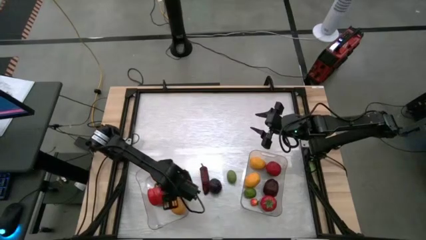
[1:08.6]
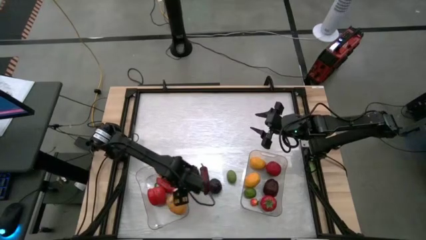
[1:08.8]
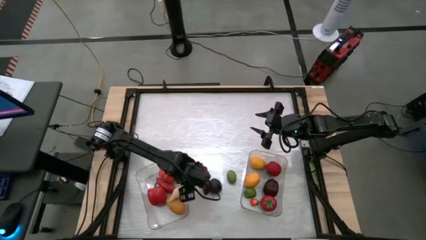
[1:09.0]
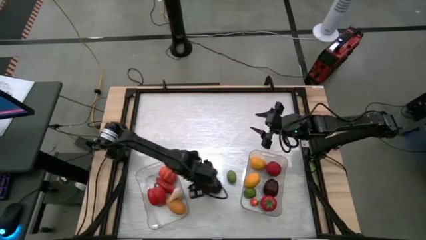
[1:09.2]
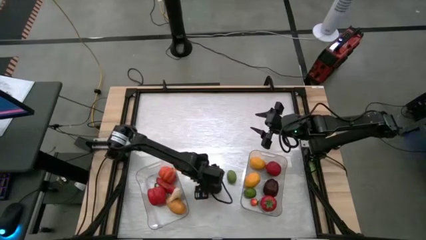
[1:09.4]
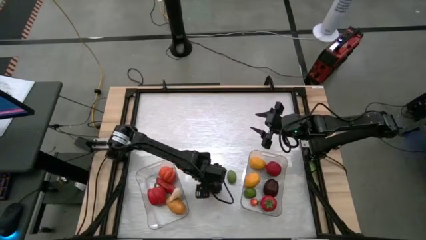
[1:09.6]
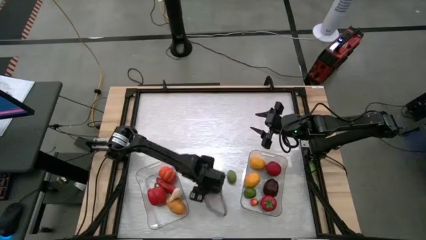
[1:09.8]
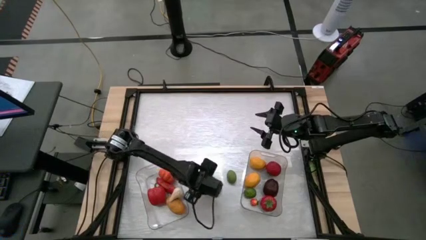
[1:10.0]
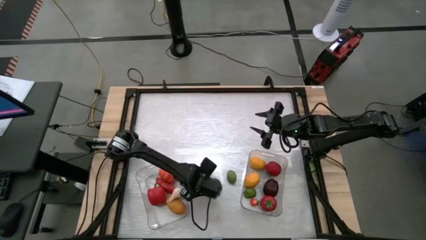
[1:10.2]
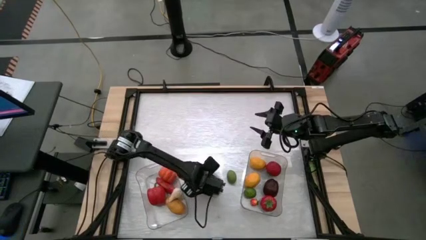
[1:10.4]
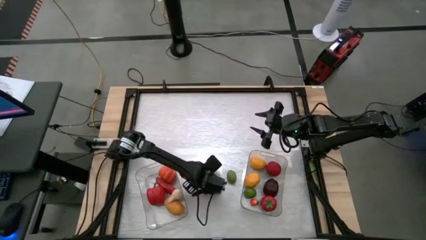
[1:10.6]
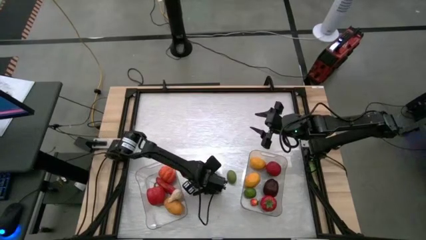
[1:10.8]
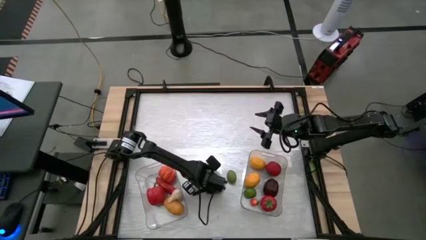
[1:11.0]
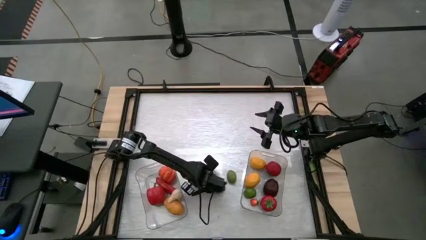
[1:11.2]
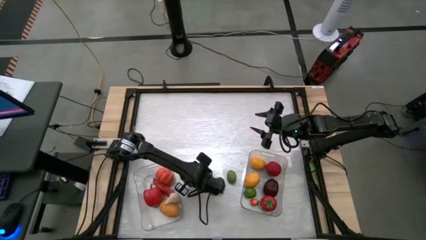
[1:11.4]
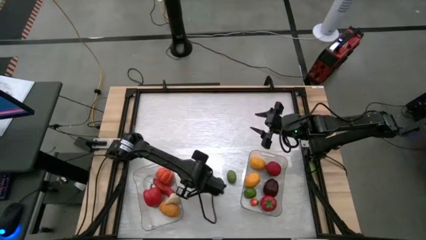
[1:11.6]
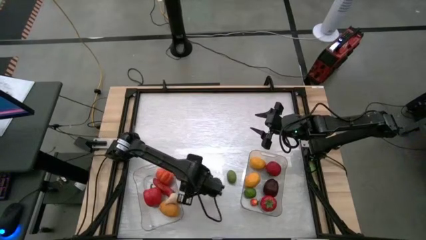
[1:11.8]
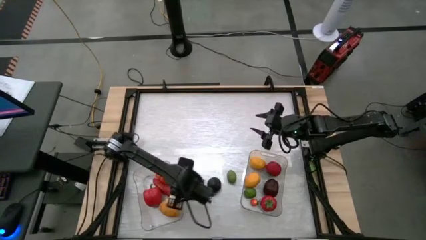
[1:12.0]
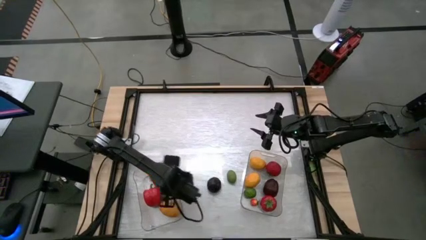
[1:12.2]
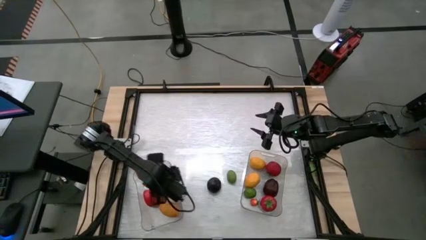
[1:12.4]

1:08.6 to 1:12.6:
Task: Sort produce into baskets
Put the dark red chili pepper into the left transparent bin

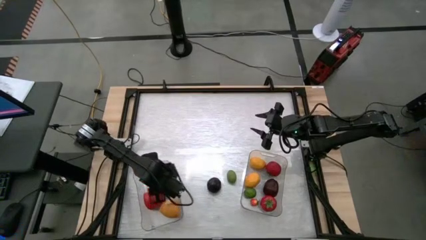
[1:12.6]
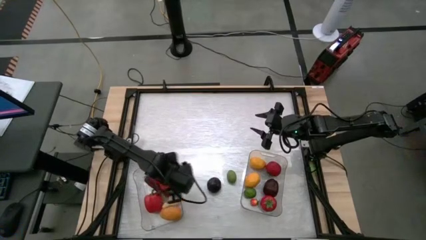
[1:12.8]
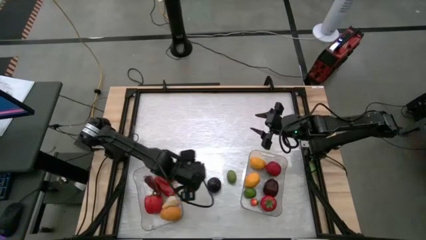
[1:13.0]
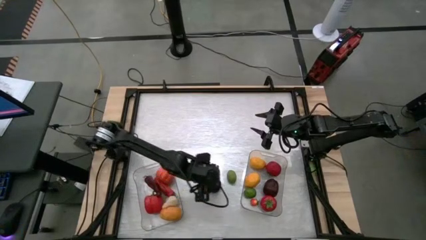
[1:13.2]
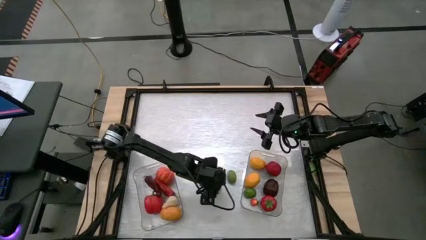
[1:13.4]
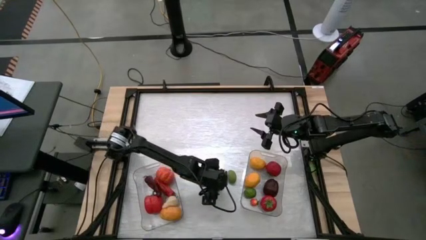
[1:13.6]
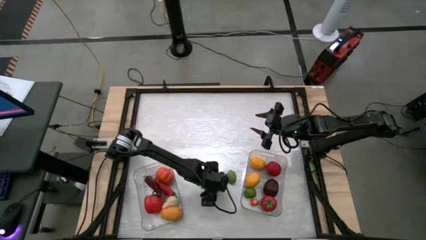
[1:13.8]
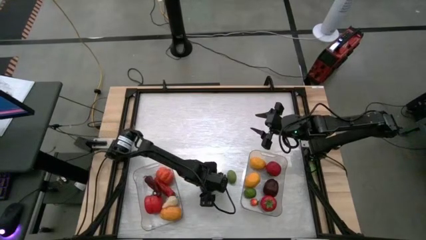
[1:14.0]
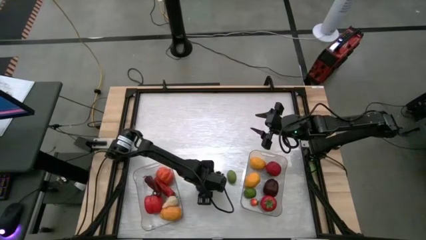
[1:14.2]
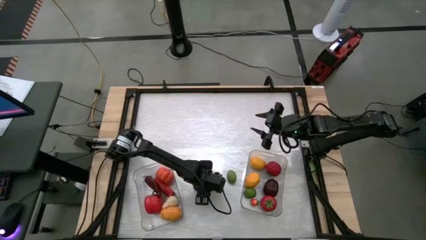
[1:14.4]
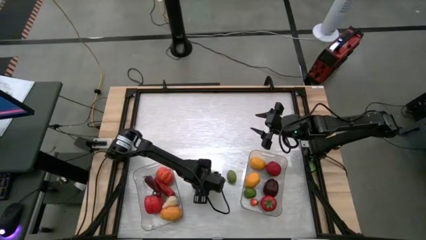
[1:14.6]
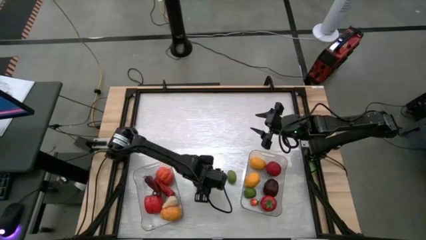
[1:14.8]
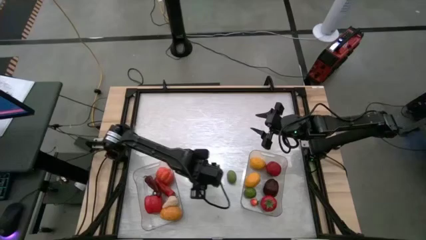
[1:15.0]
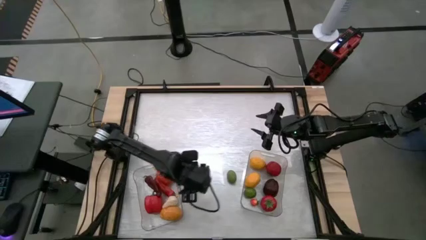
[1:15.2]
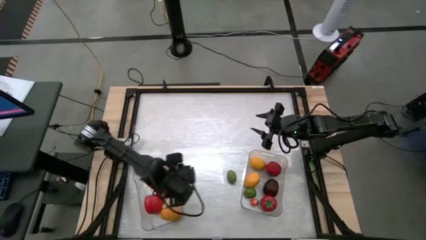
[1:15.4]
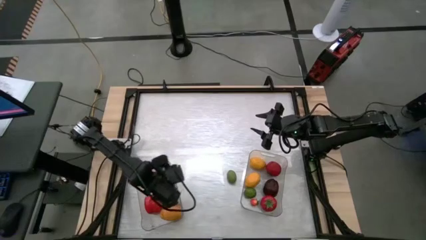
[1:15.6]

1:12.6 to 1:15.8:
Put the plum into the left transparent bin

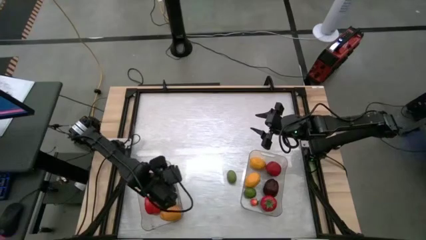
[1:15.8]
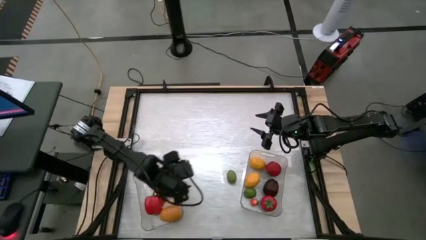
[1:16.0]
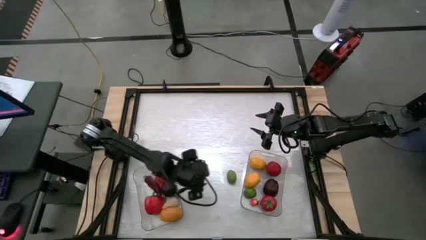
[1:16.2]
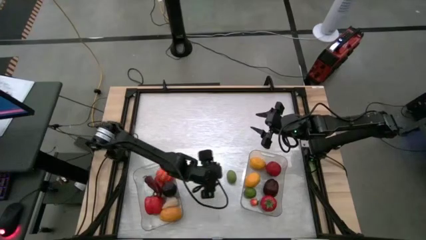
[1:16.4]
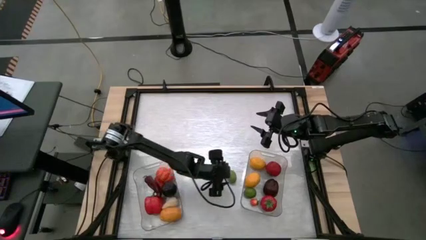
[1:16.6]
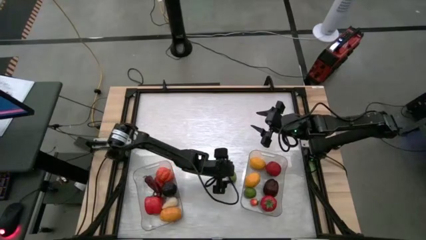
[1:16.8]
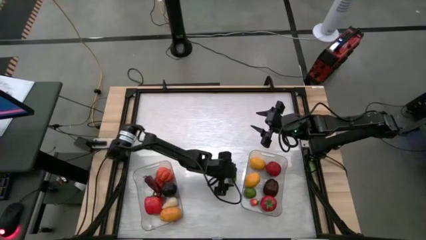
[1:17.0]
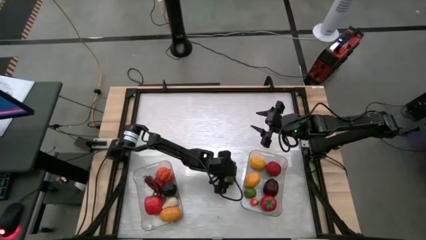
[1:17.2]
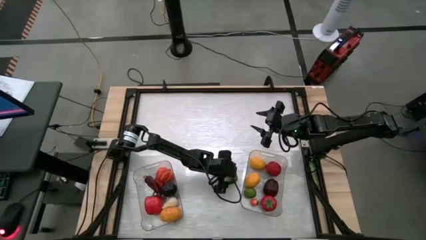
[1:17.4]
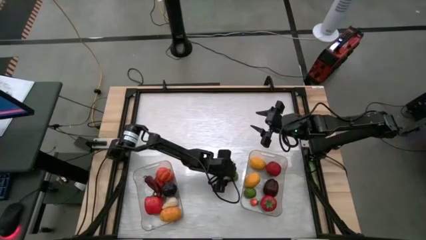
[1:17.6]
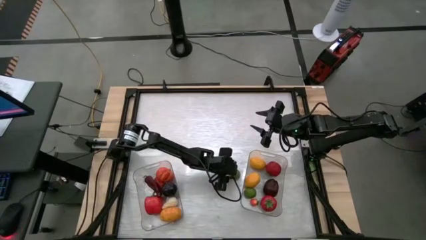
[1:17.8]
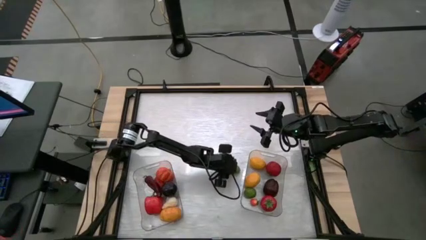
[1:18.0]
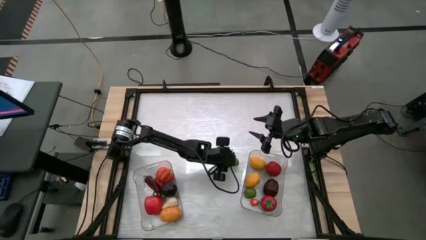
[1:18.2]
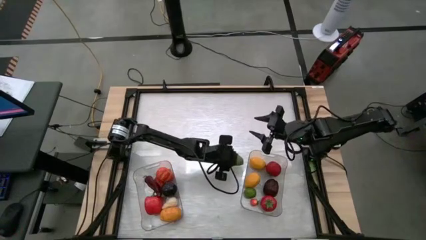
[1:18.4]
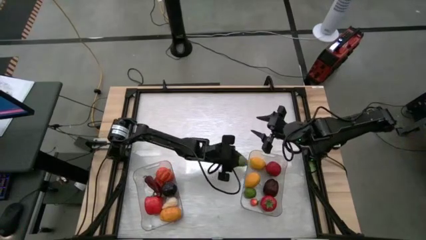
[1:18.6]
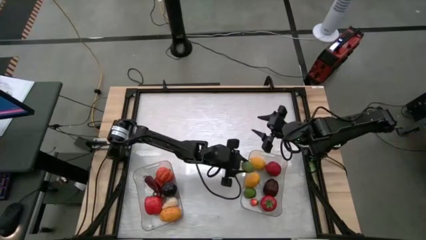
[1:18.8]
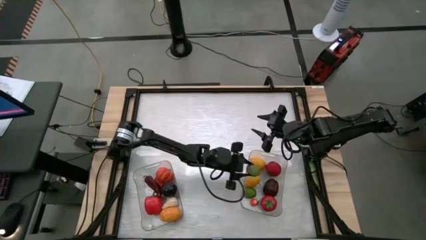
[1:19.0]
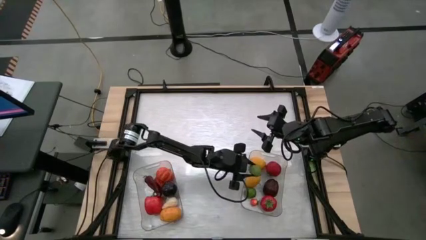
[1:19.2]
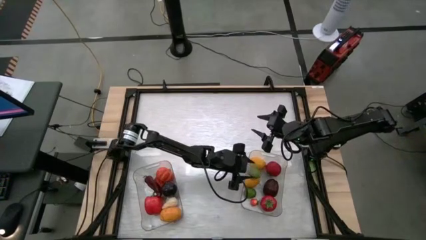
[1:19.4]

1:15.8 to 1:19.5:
Put the lime into the right transparent bin

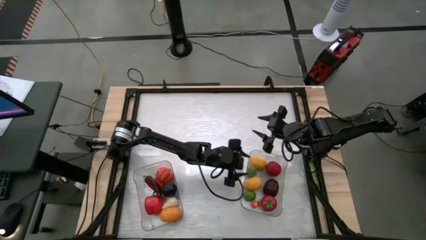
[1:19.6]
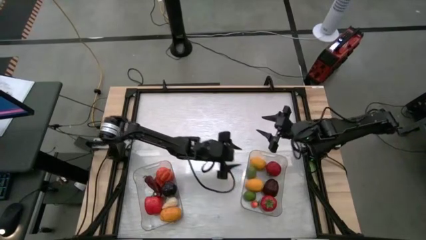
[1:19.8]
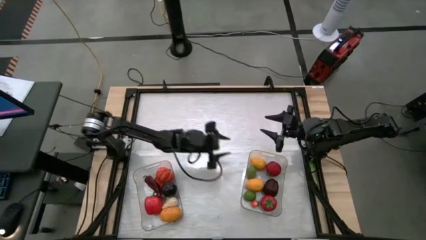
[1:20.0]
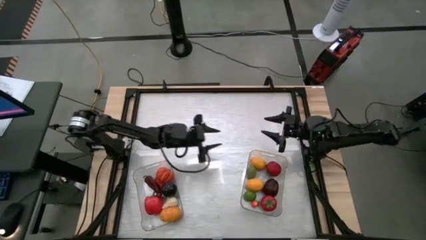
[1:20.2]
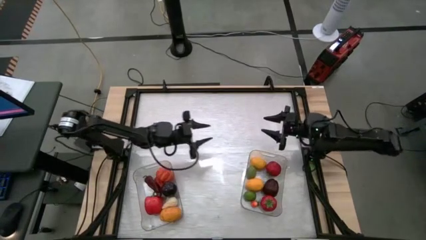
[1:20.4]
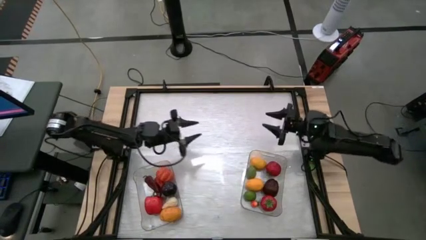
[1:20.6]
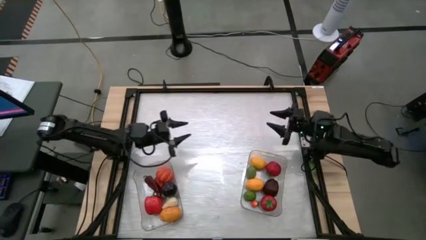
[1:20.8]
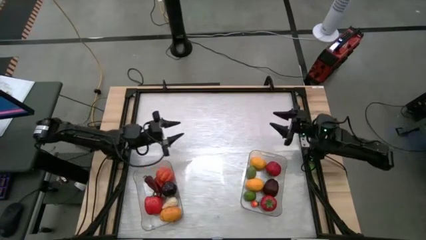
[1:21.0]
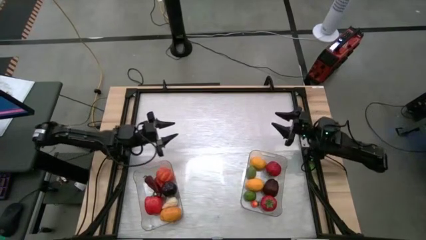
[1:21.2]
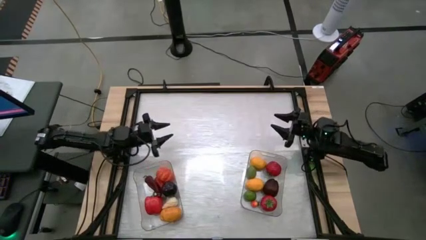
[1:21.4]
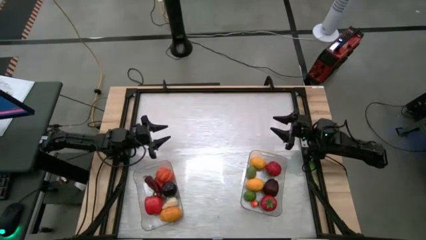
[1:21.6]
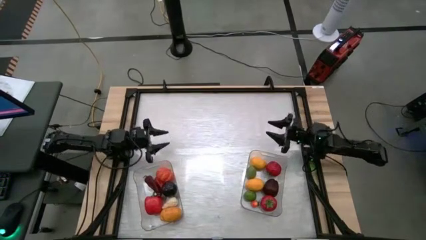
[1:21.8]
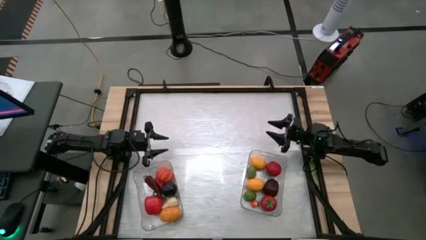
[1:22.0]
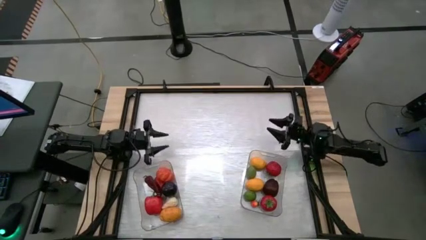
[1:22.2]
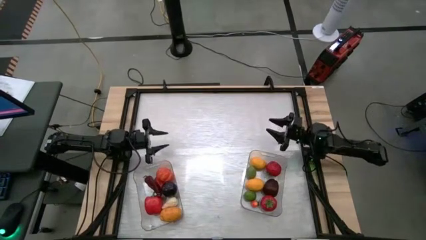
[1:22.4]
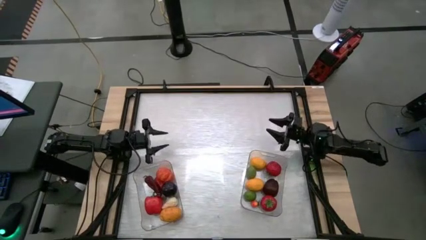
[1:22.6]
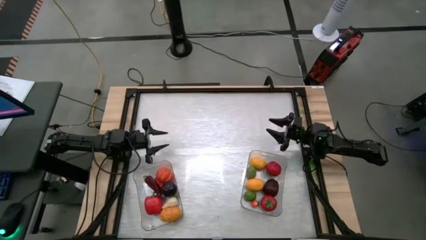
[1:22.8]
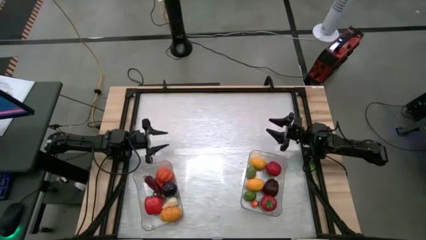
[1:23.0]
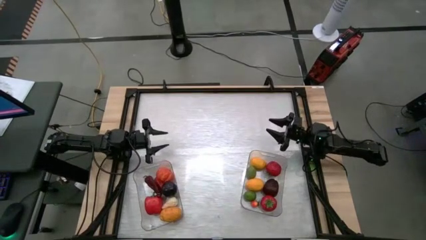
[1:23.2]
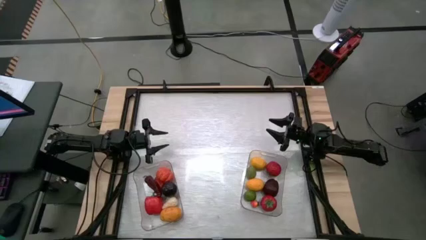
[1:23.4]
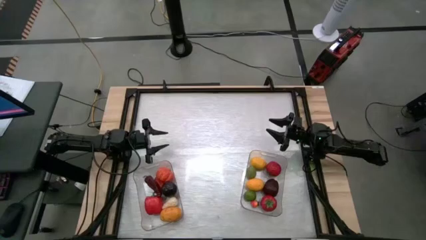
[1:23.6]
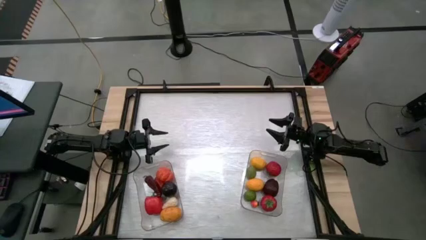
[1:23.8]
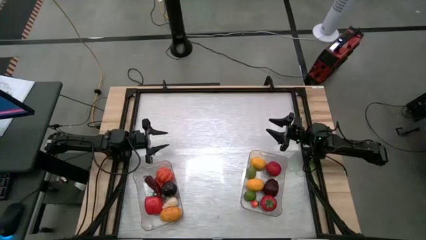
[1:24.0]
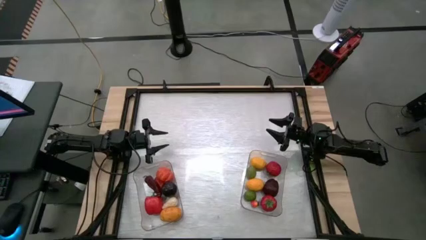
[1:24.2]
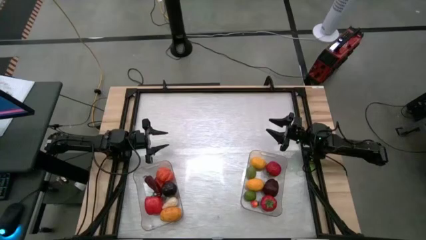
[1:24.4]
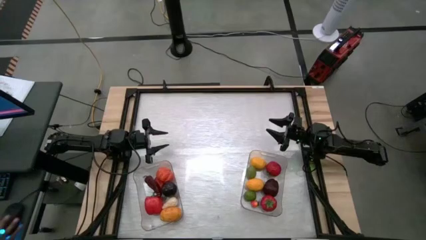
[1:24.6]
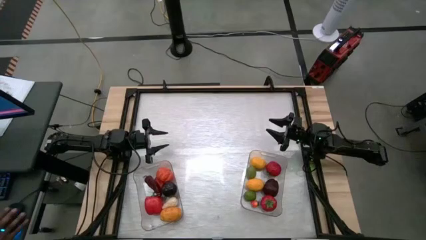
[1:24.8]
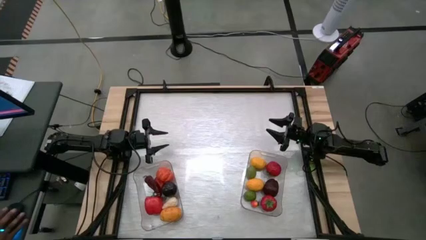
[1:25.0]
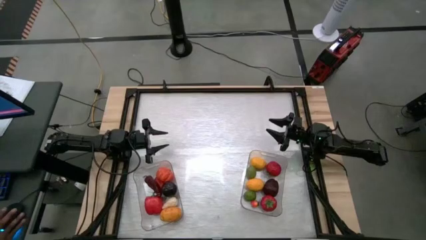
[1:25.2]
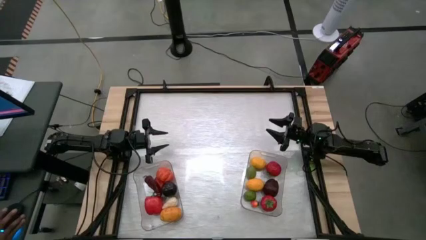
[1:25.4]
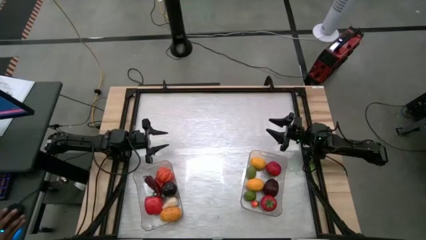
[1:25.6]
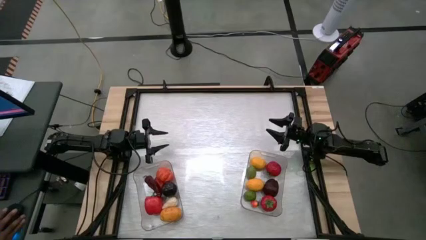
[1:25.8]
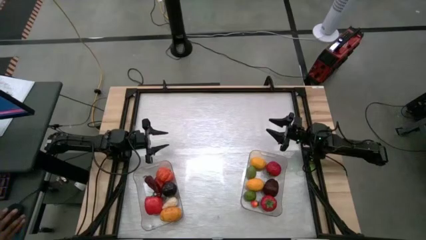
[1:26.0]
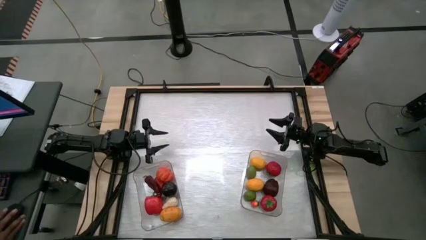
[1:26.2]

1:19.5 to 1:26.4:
Return to Home Position
